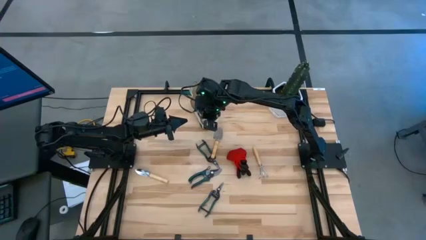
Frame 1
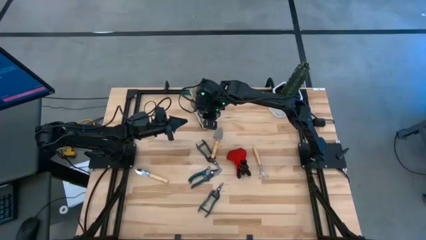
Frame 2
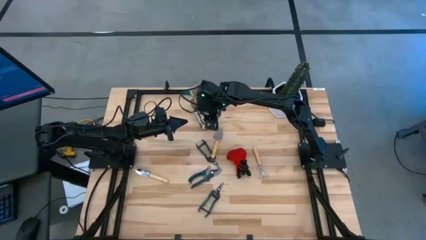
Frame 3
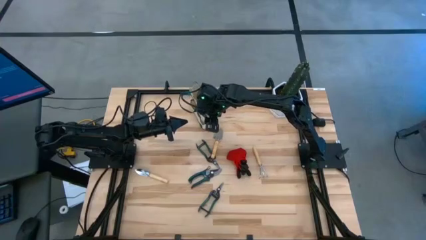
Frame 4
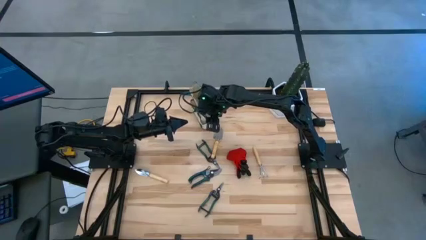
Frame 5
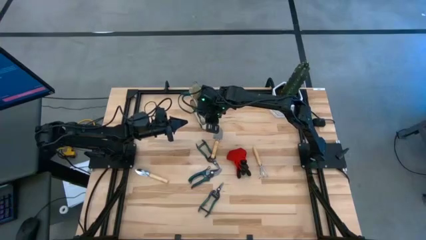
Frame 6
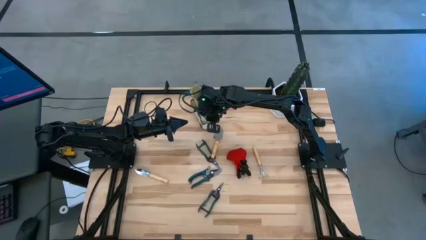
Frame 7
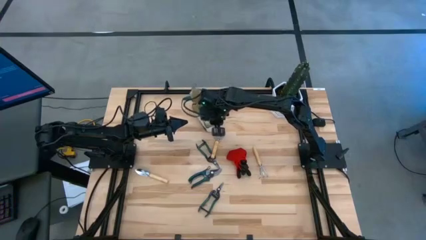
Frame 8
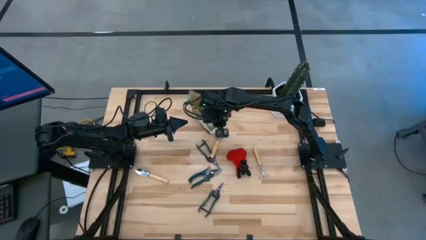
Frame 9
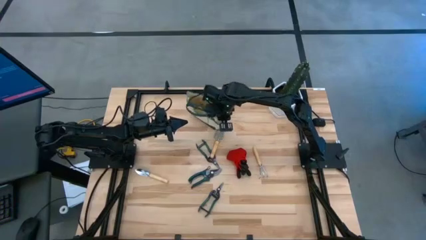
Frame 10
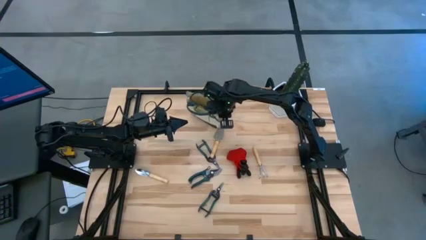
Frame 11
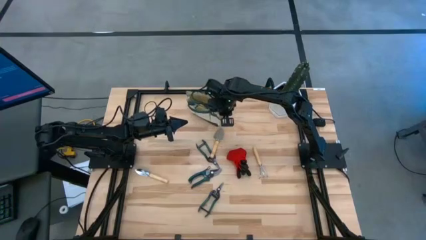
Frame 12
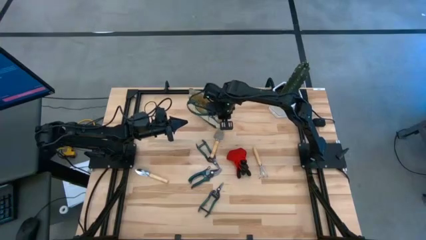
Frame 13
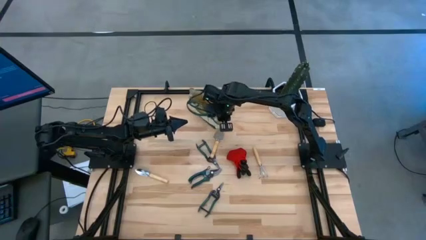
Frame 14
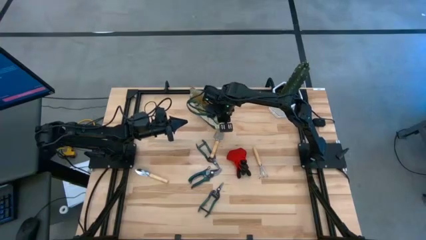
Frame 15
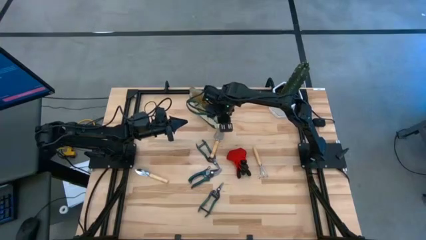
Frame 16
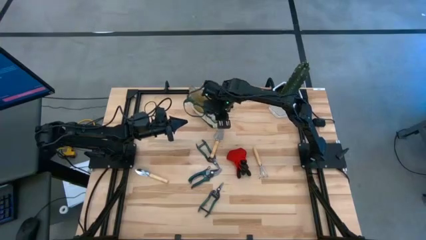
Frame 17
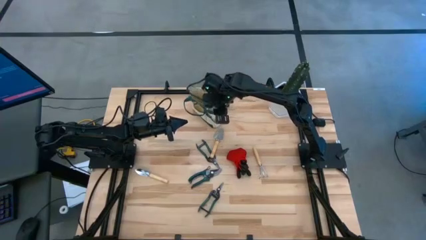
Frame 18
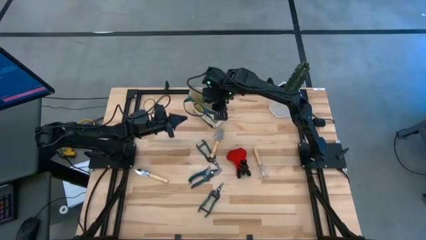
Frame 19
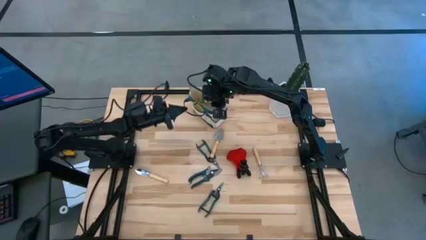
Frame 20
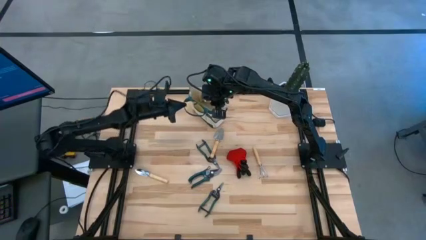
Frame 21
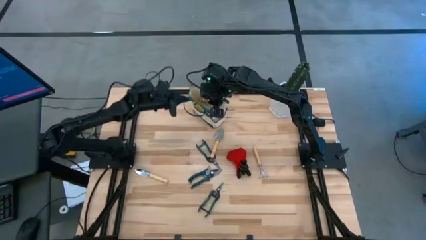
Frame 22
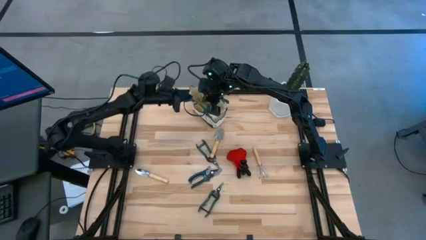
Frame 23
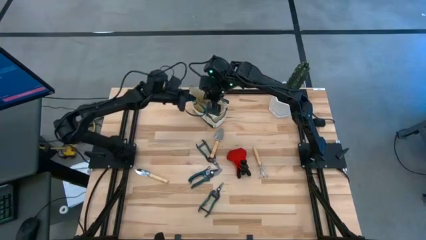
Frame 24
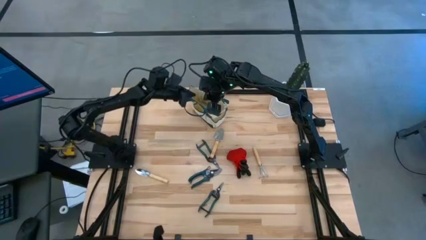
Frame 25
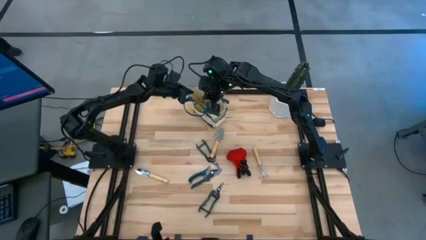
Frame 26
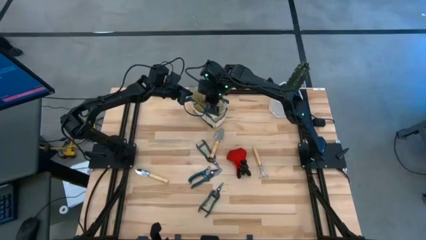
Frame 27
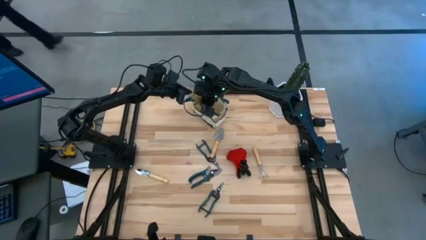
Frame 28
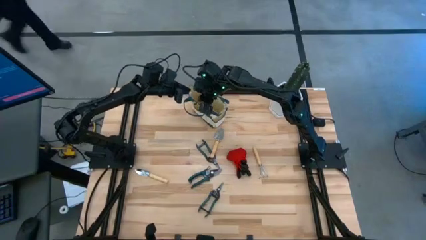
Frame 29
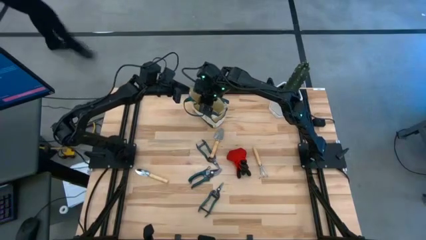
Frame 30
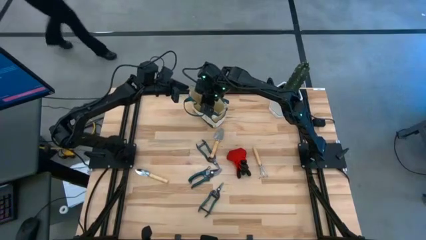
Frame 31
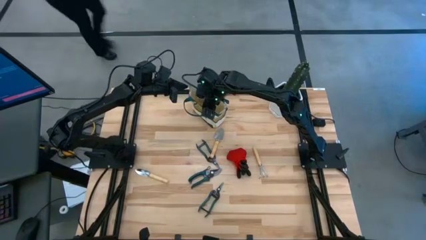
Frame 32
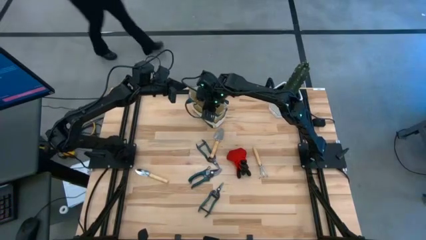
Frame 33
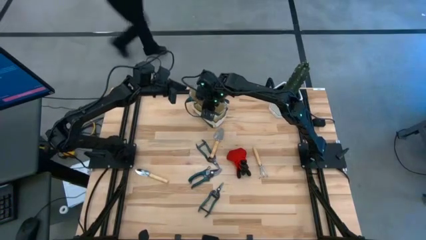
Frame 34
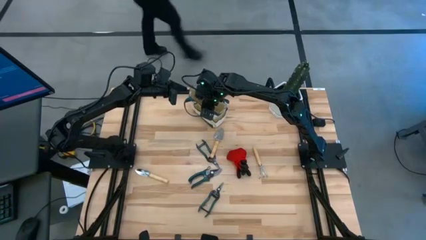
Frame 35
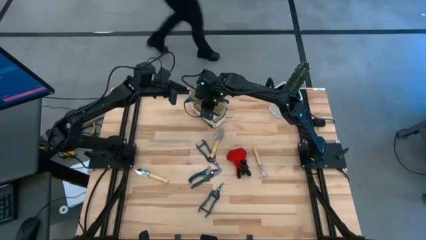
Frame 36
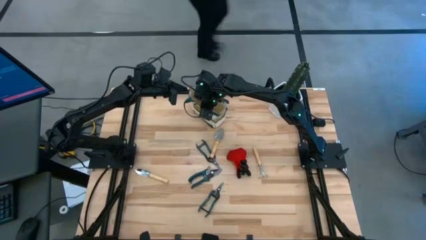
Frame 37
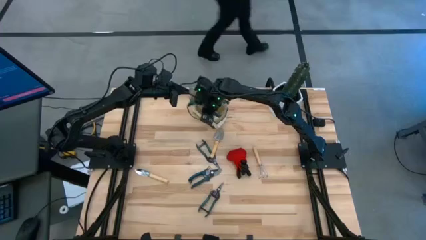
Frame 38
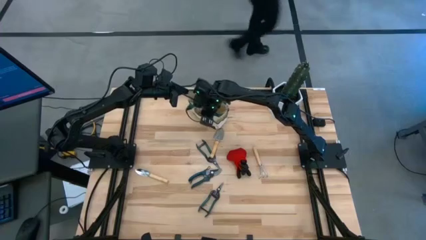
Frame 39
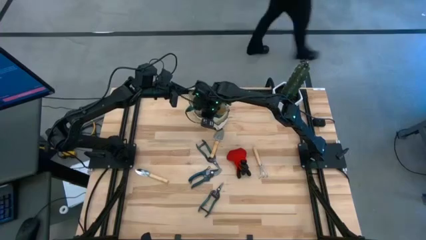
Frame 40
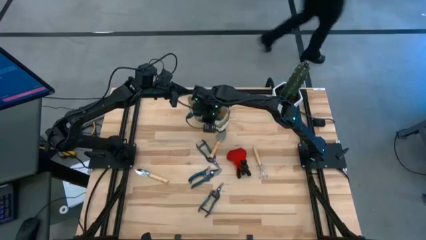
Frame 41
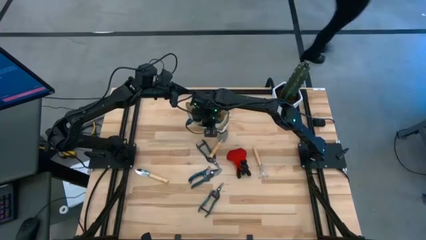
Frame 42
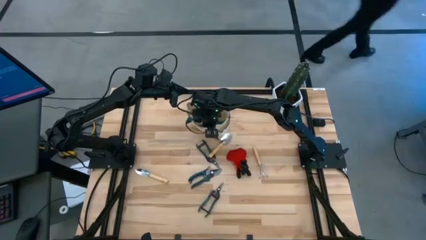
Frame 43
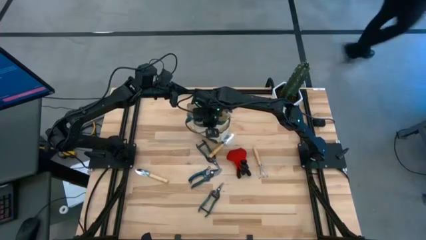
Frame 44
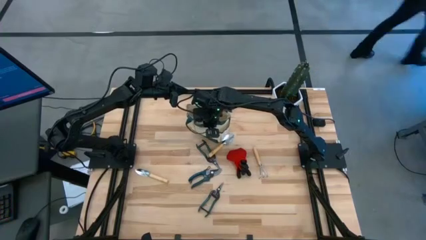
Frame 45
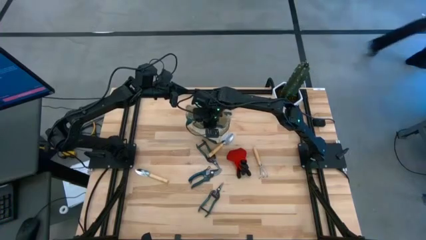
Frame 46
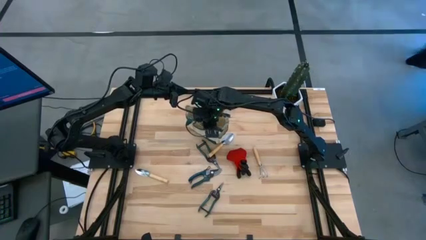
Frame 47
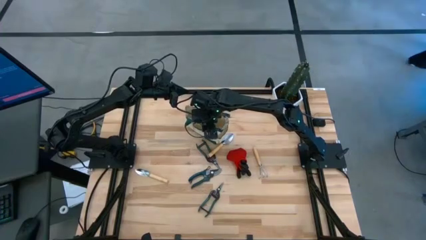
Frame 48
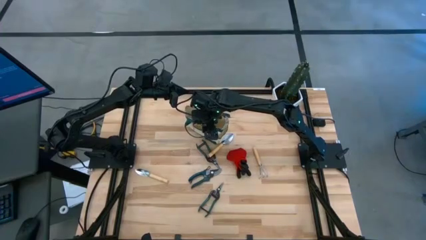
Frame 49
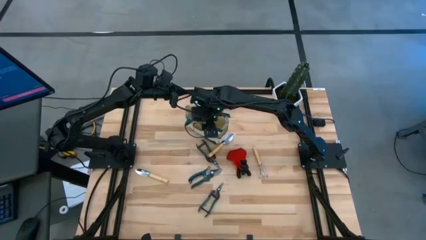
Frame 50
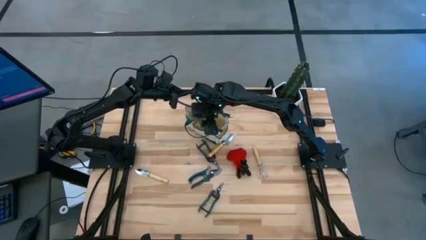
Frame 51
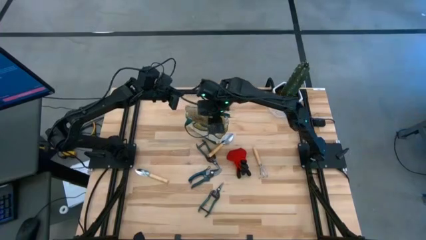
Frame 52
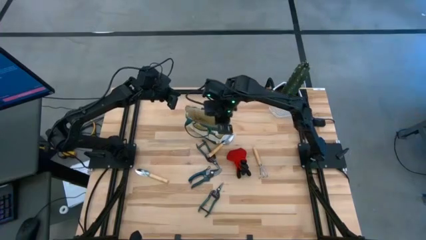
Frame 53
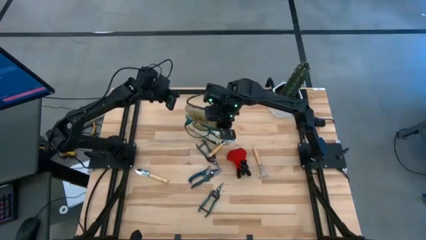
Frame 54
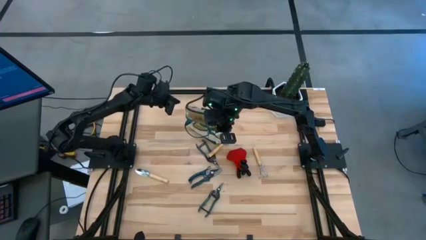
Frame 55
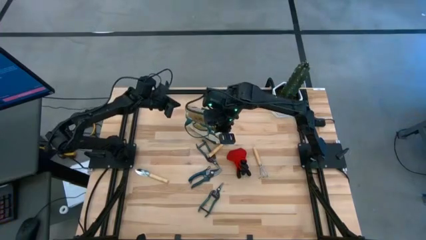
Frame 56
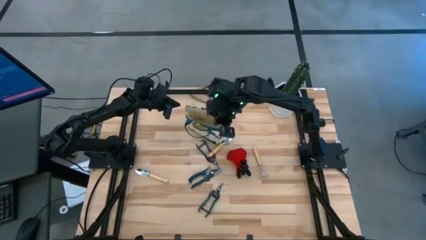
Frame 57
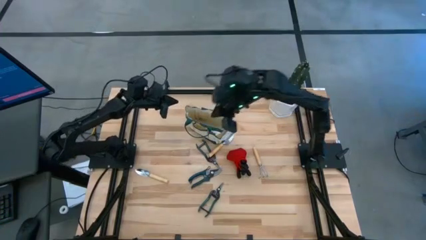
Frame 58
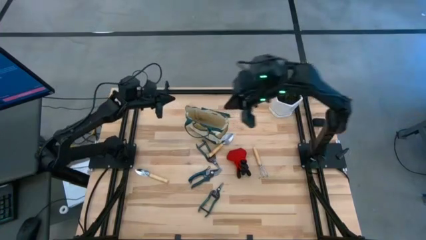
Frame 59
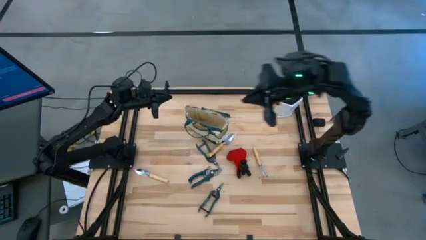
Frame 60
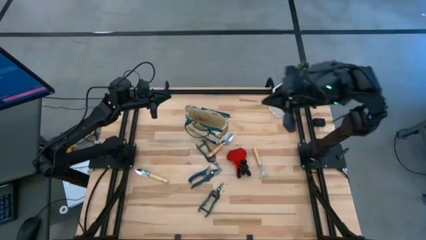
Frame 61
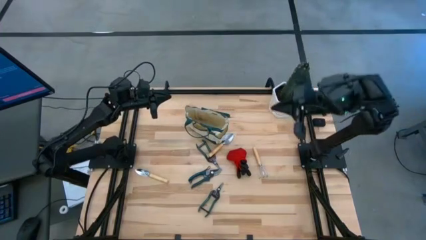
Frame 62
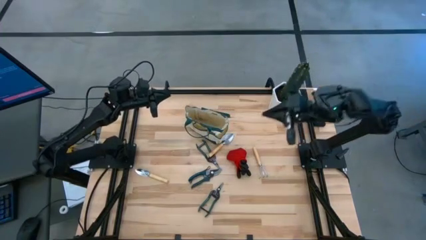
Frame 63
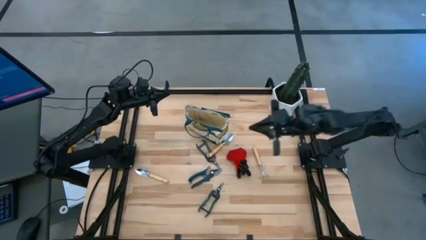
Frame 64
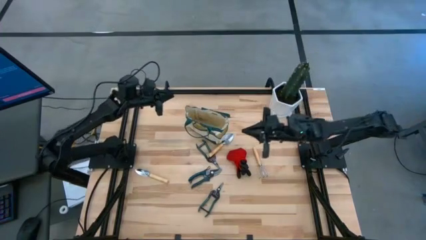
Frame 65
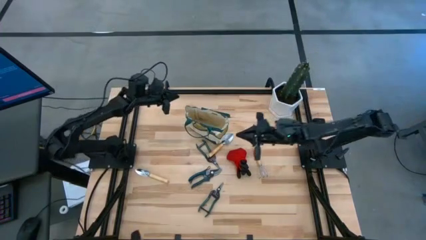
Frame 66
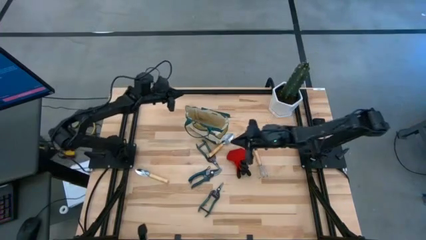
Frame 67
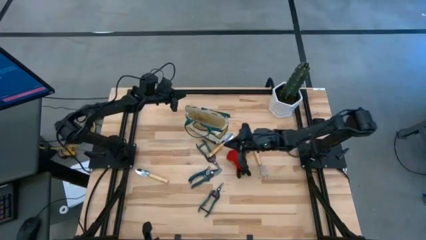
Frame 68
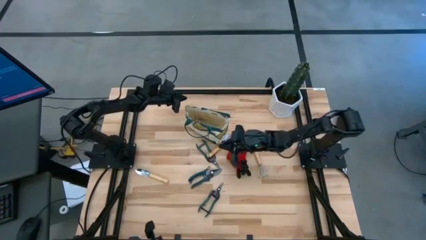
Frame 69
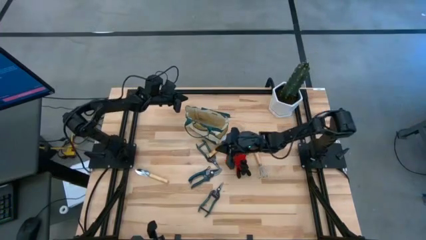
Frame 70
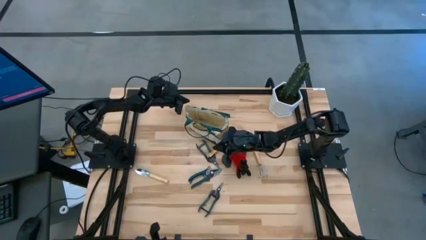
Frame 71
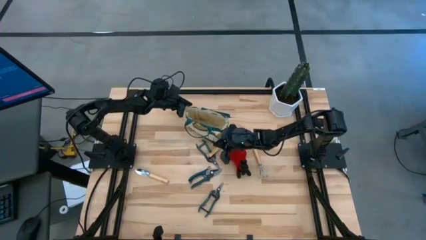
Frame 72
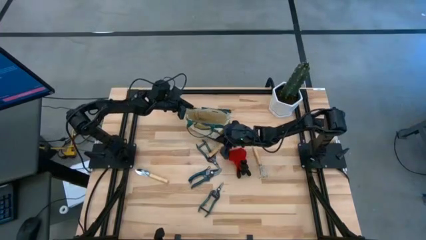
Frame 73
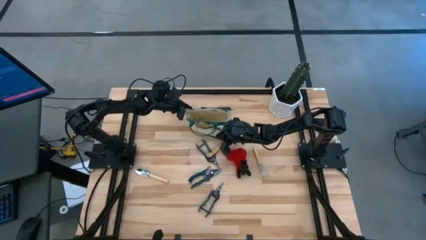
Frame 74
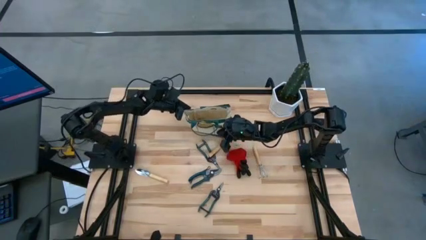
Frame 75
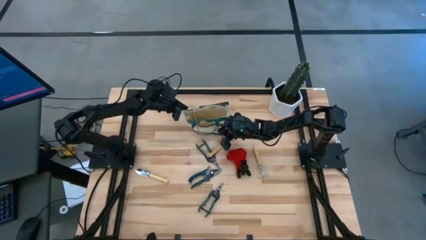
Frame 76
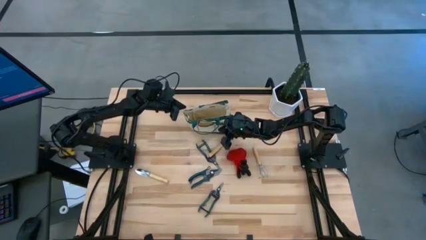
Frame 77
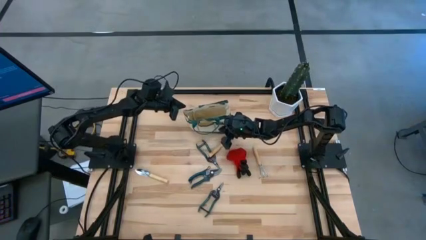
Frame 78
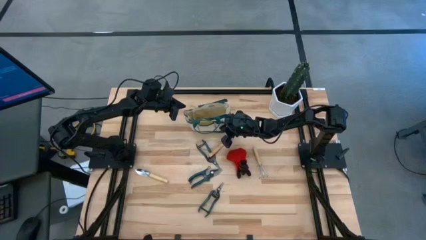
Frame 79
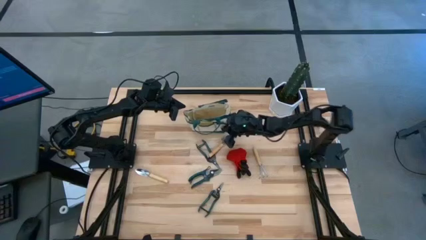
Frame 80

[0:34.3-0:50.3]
Task: Pick & Place Garden tools in Gardening bag
Prepare the brown gardening bag
